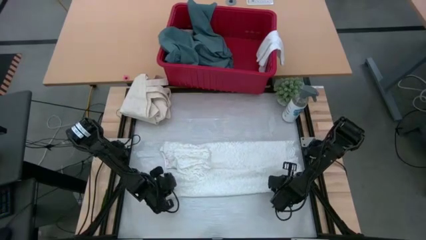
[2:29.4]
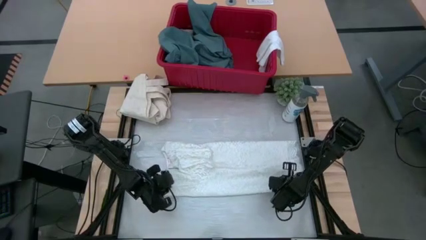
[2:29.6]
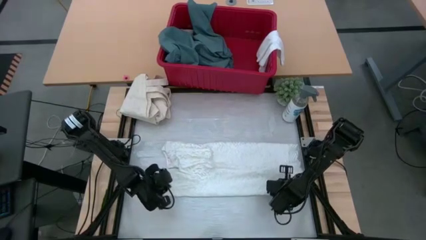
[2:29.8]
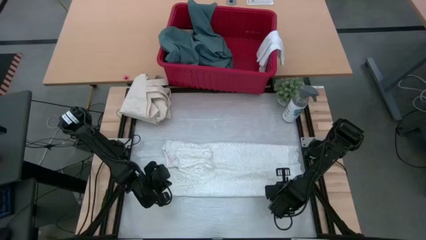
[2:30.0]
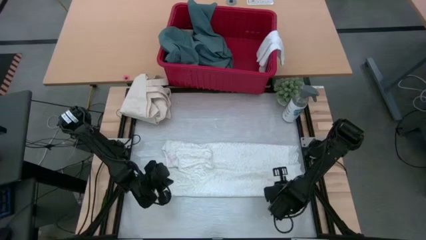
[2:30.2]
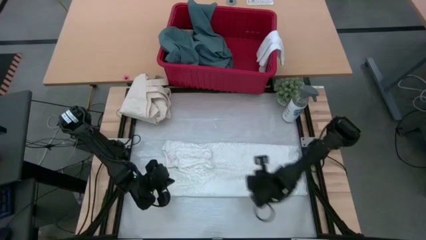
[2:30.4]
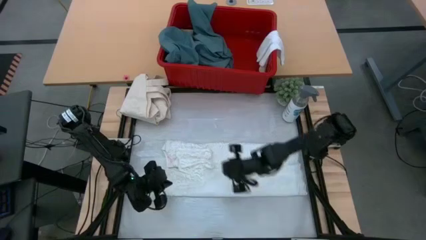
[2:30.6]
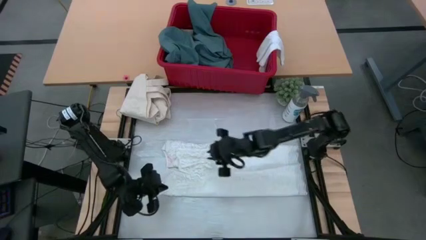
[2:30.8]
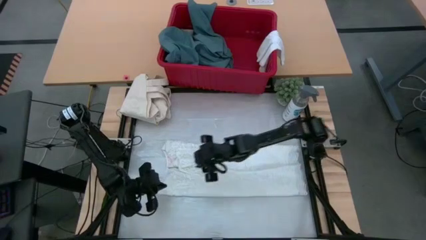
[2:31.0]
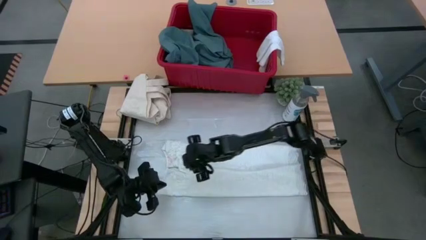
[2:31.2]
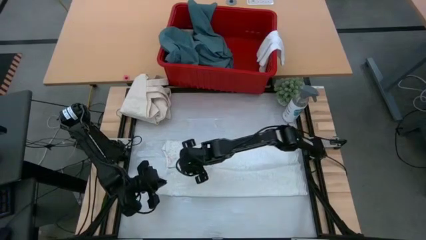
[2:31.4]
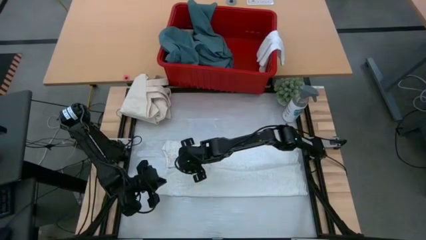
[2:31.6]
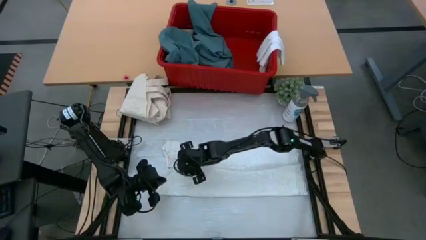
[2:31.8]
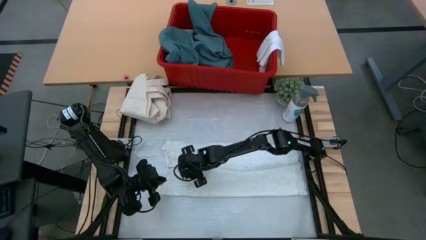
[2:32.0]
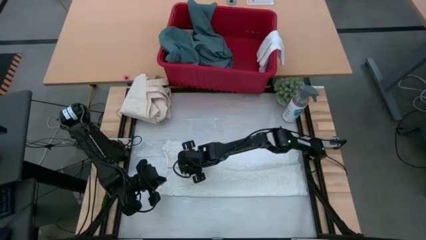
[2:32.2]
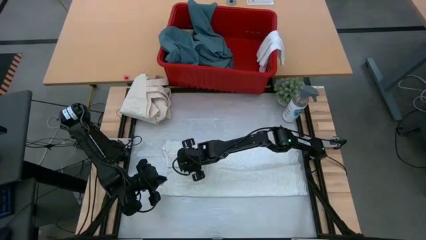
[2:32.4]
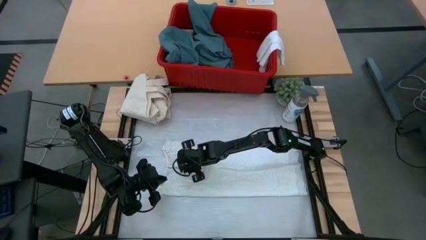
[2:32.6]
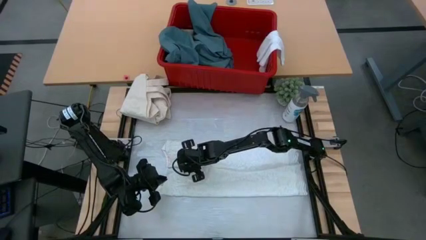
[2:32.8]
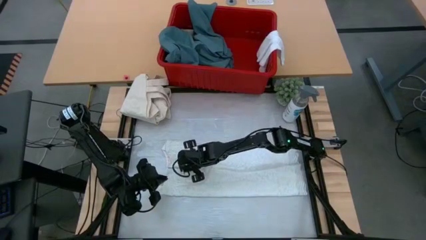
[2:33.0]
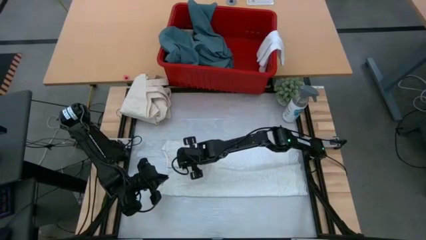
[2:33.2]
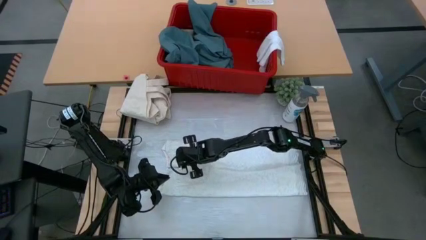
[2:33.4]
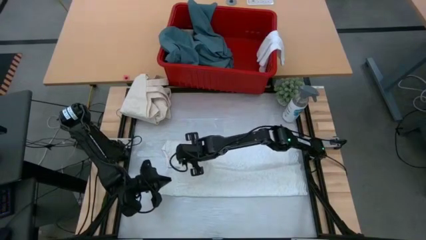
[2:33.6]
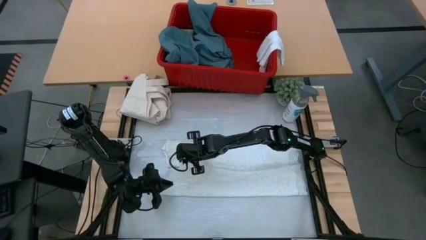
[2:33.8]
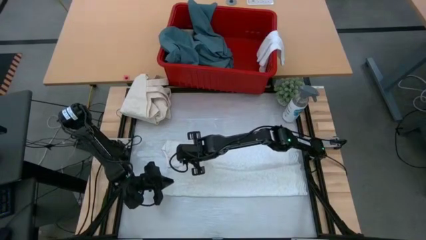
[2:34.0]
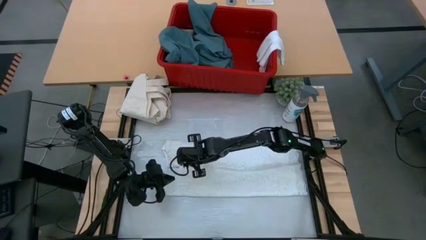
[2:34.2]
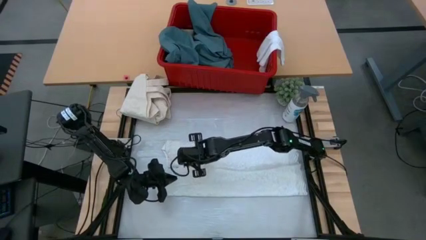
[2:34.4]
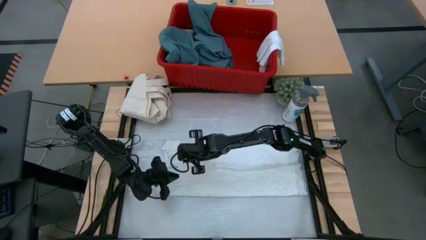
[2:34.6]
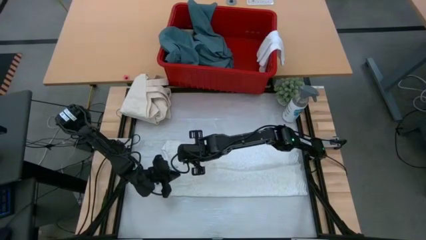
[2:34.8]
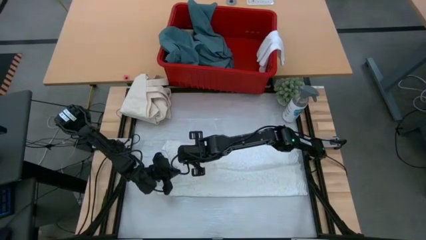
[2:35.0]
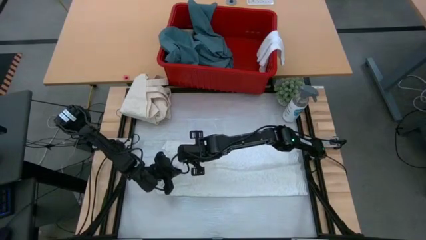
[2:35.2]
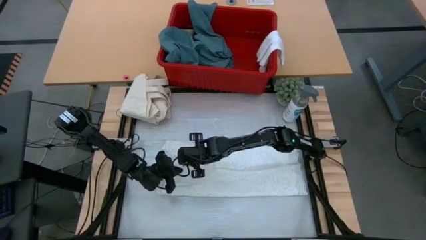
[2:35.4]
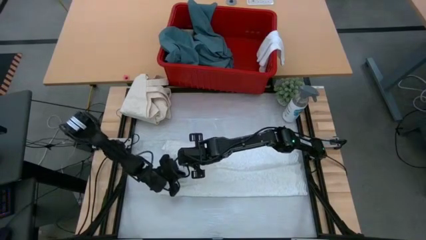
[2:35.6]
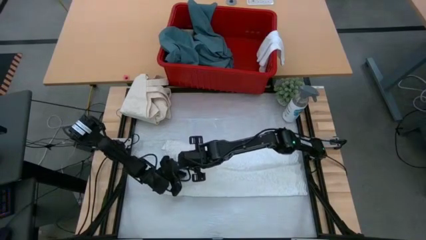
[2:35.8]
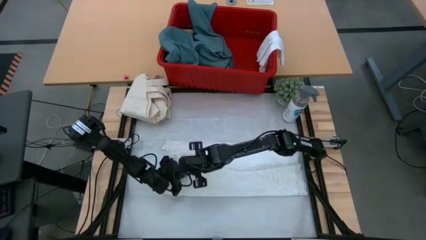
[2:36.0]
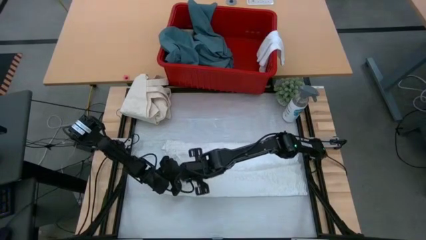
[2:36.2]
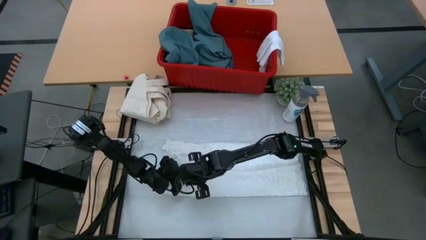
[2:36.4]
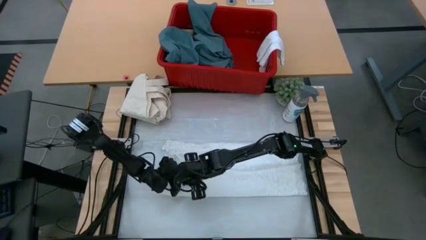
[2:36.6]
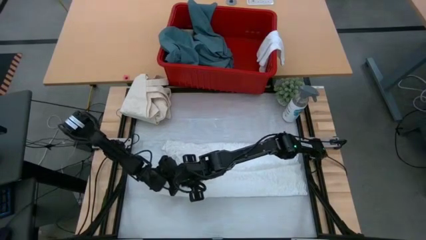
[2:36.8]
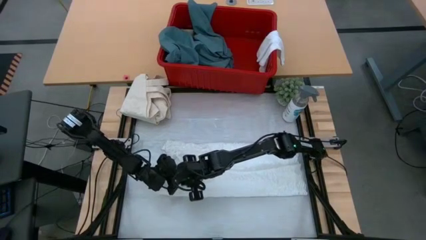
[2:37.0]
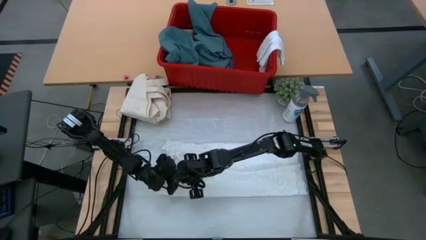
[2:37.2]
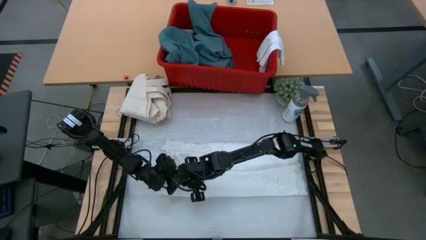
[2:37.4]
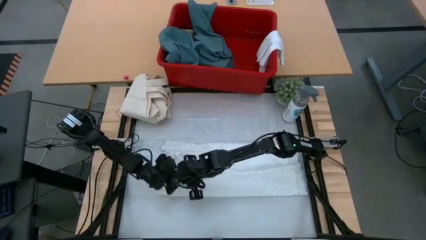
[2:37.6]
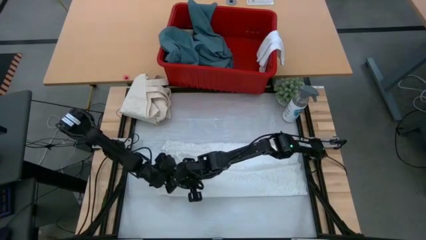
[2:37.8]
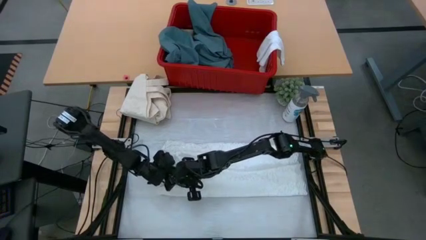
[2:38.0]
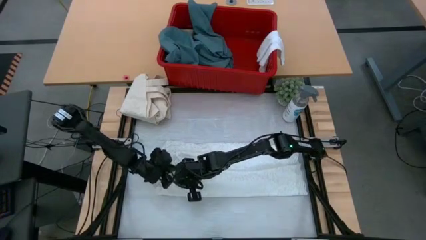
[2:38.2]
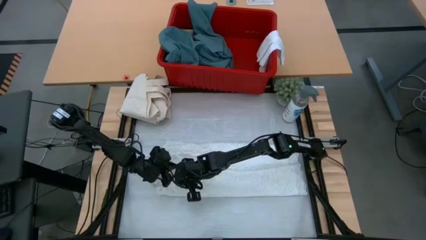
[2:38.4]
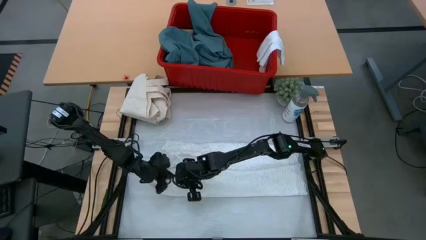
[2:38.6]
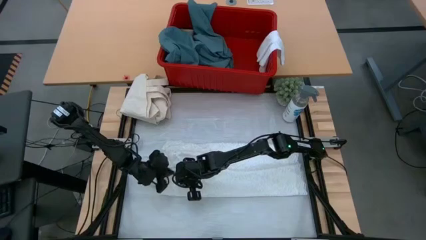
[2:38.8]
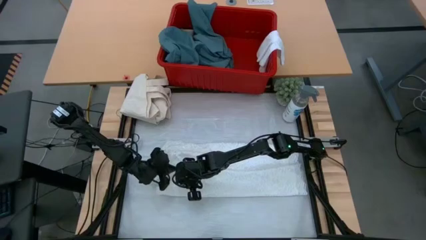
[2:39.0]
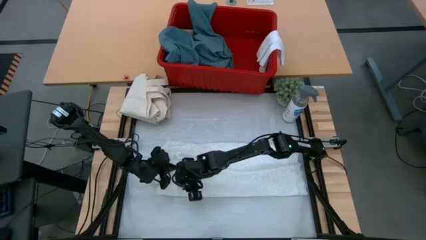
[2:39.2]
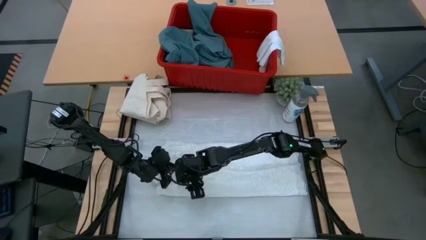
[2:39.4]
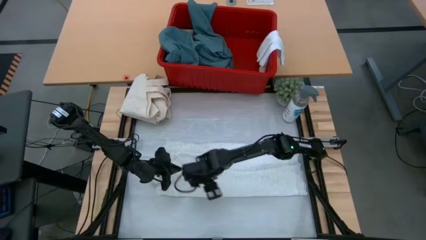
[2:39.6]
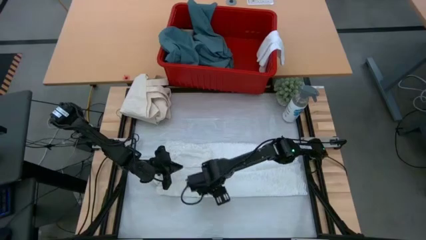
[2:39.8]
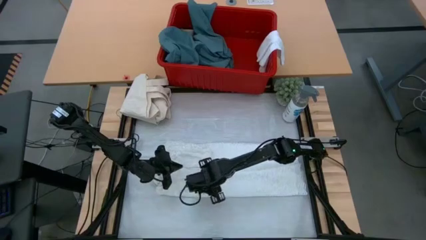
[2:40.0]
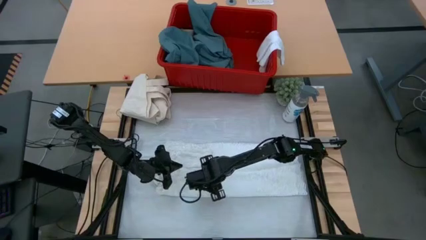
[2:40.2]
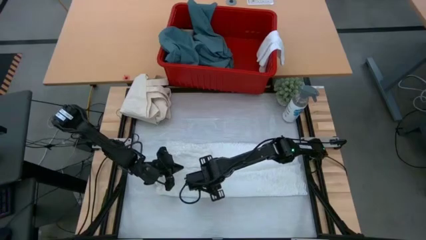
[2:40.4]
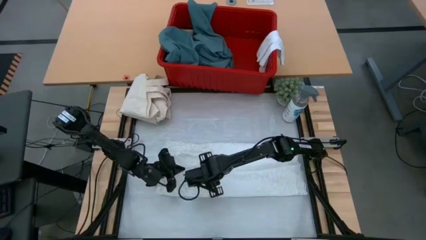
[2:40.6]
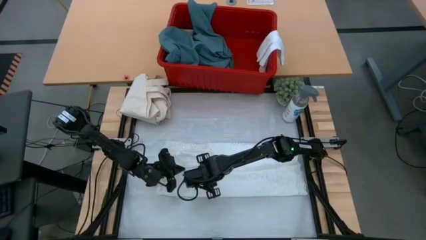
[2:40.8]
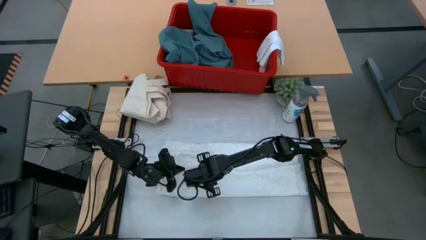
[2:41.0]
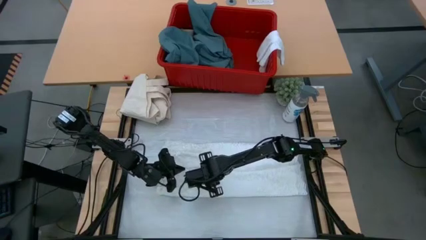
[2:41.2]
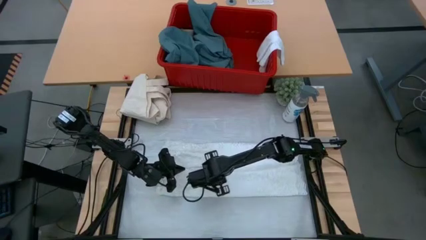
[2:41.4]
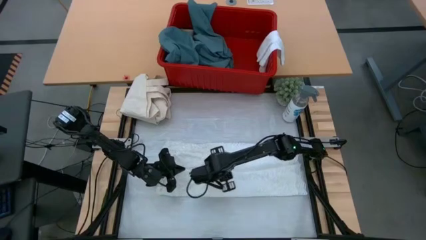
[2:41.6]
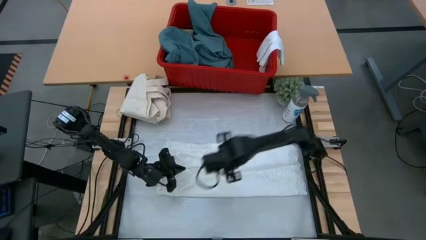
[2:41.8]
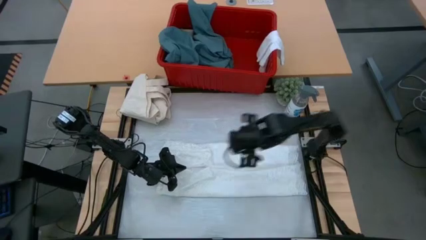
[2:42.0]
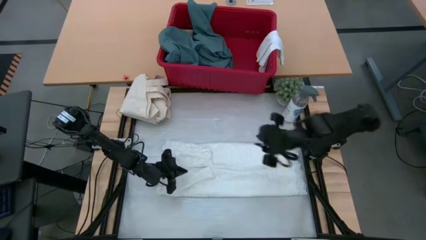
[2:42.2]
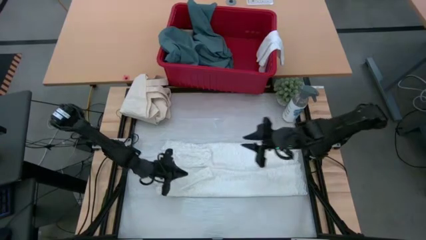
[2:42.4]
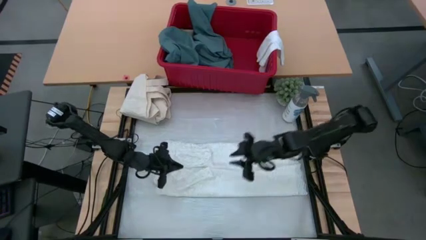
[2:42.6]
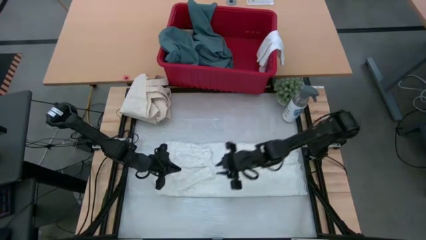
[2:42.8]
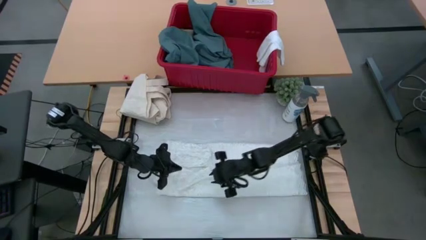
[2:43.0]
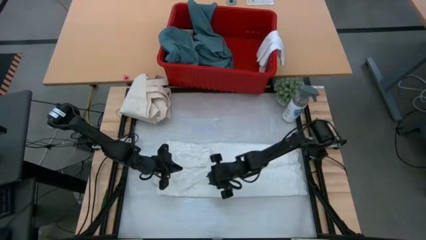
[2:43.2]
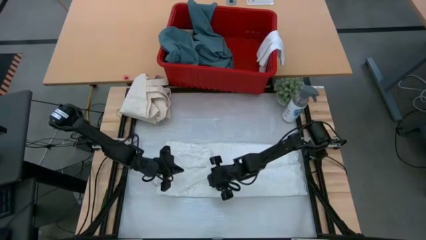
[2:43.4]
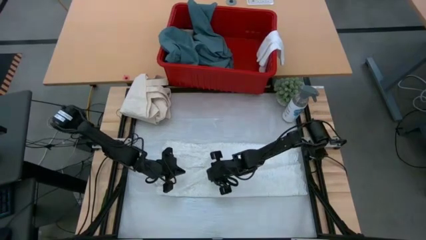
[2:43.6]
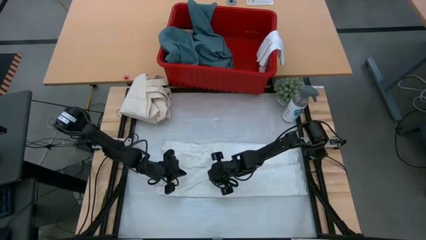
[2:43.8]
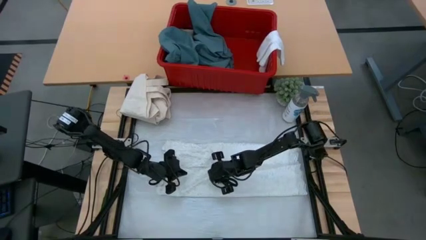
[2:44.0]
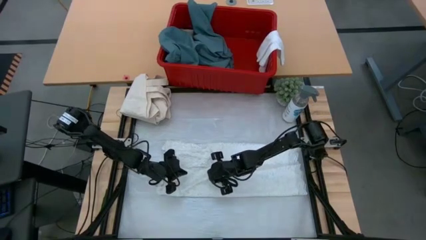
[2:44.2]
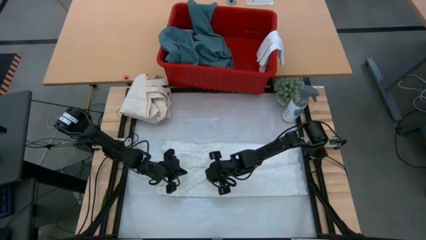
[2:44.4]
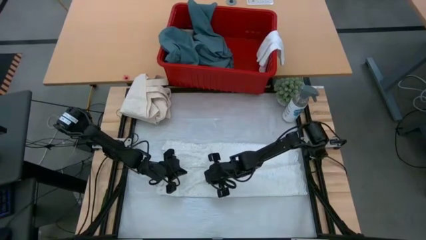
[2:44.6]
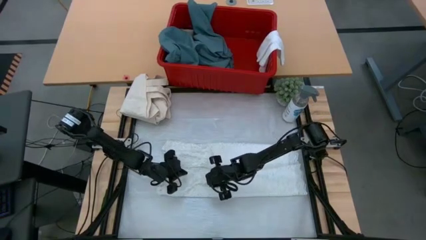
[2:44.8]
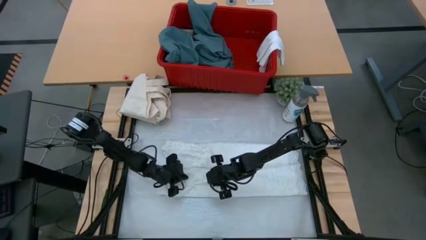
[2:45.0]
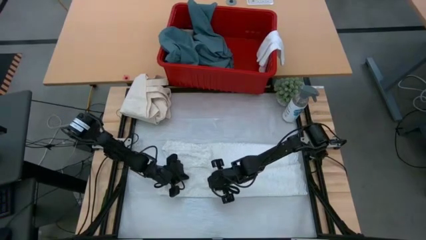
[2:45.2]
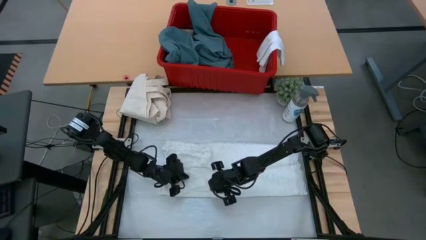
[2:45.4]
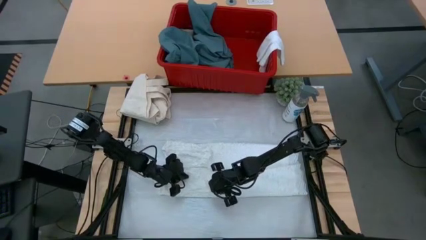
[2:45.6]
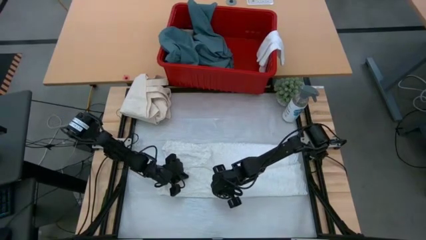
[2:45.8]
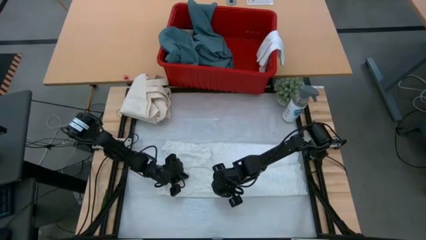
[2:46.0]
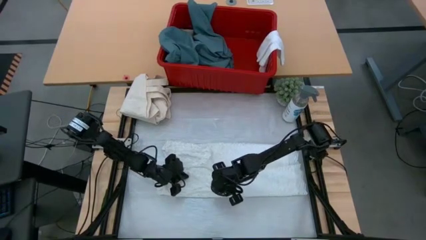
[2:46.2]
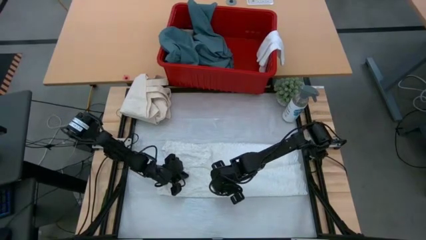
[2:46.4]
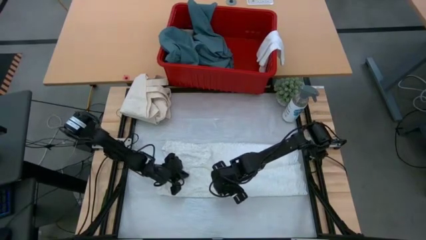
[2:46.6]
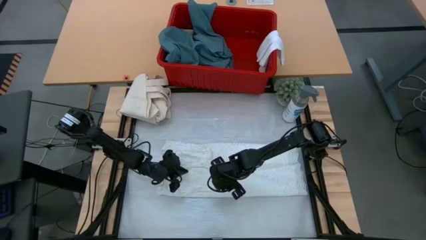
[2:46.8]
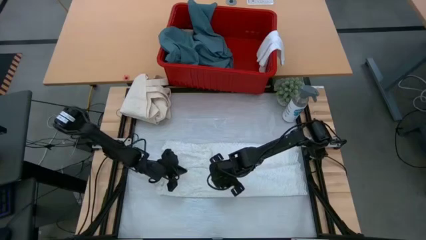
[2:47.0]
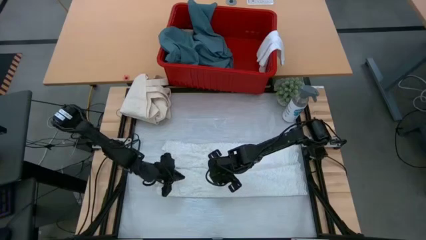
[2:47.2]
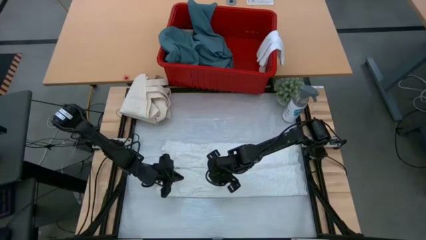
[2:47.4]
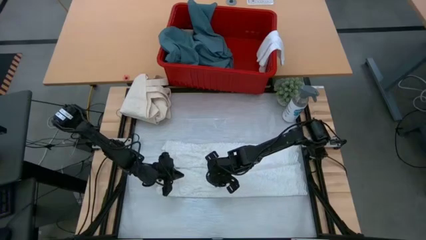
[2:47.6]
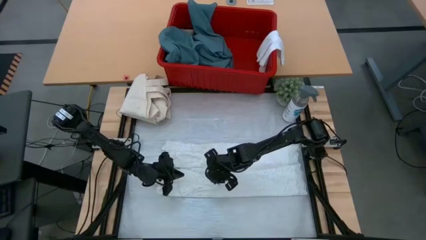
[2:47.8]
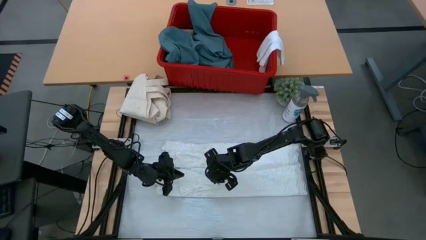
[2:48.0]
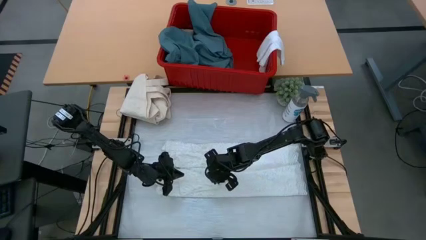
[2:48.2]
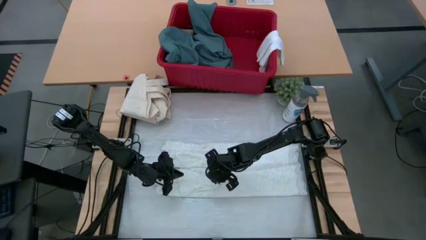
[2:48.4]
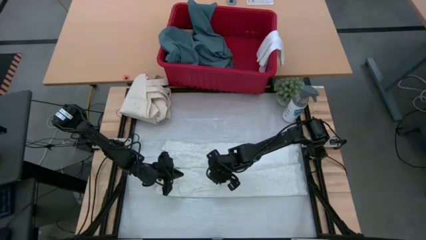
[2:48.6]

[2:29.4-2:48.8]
Task: Fold Laundry from Bin
Fold the white shirt
